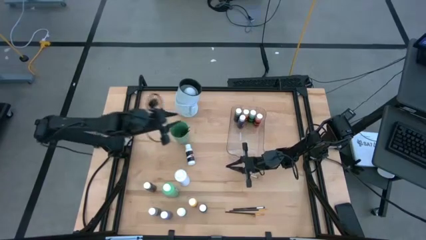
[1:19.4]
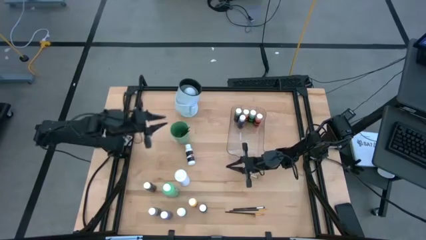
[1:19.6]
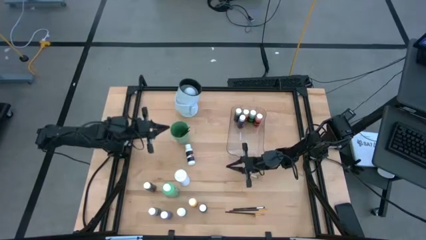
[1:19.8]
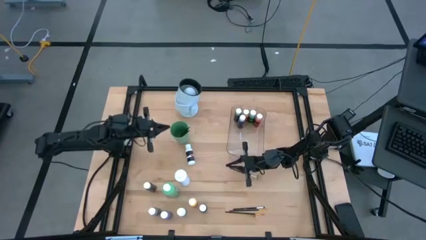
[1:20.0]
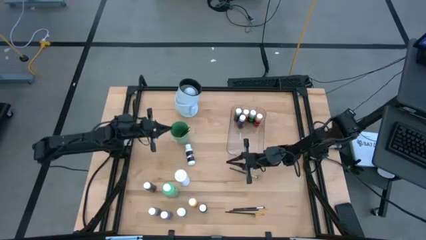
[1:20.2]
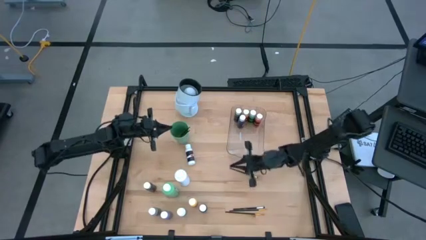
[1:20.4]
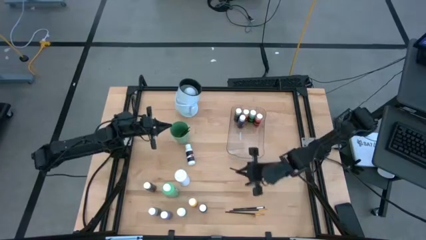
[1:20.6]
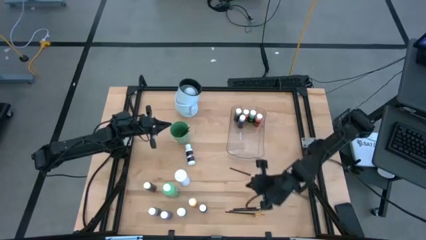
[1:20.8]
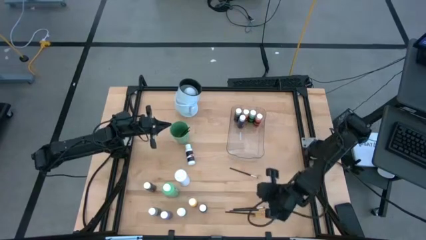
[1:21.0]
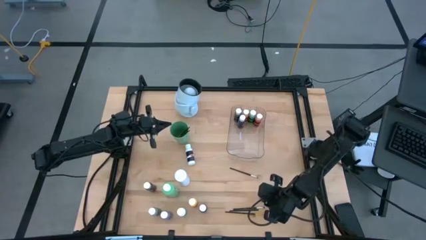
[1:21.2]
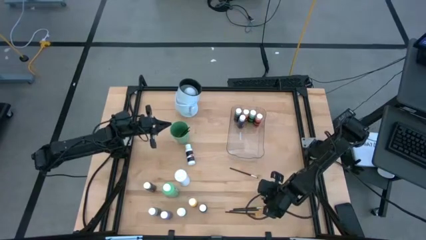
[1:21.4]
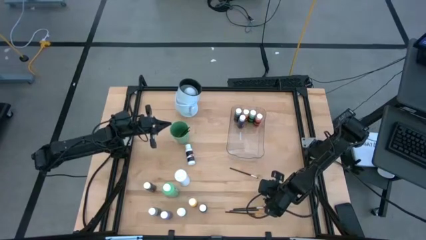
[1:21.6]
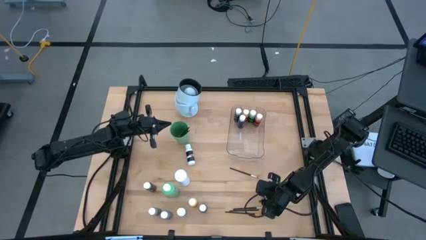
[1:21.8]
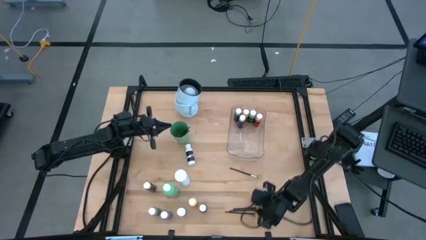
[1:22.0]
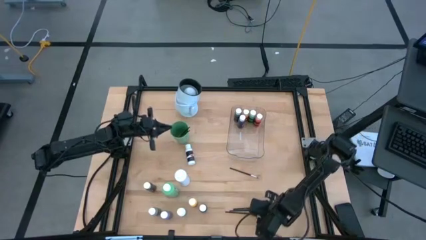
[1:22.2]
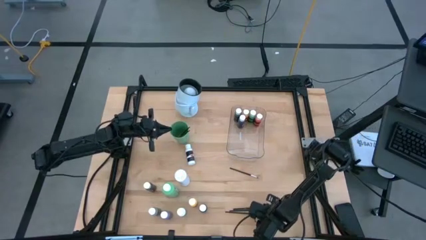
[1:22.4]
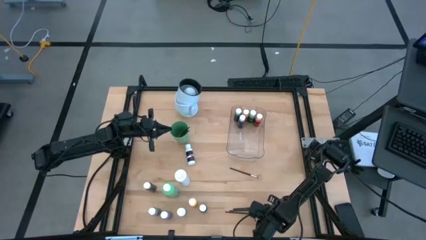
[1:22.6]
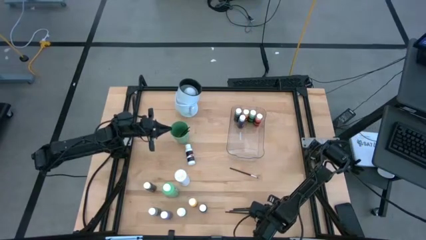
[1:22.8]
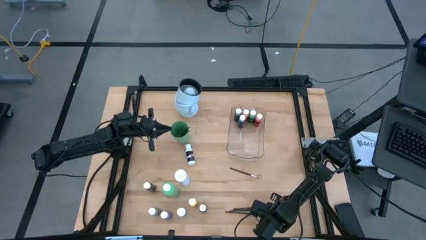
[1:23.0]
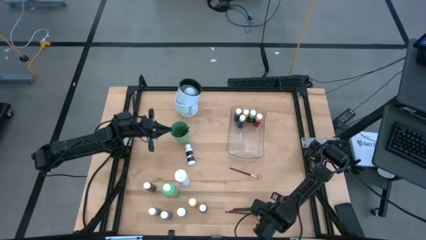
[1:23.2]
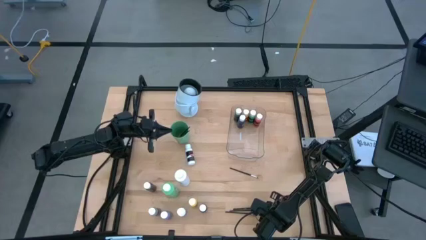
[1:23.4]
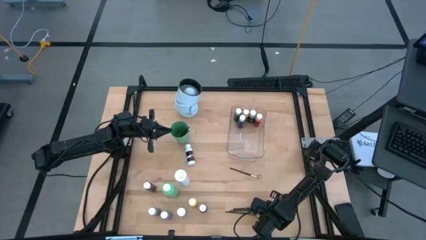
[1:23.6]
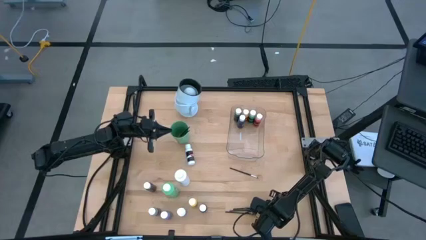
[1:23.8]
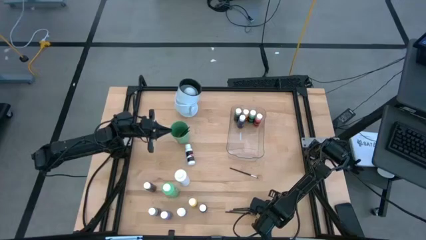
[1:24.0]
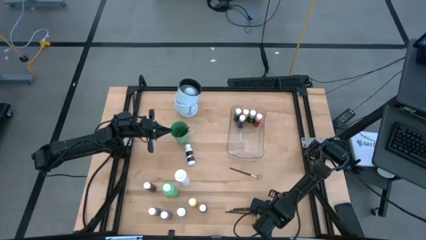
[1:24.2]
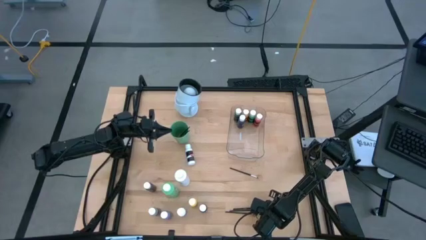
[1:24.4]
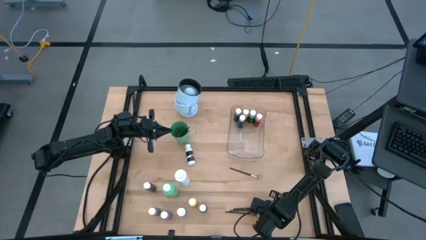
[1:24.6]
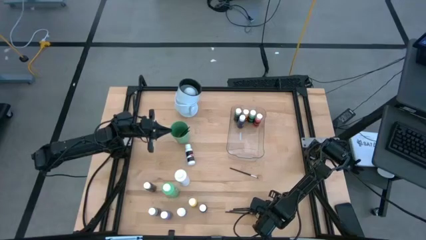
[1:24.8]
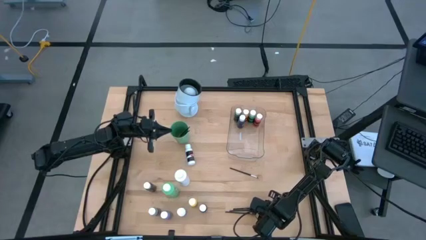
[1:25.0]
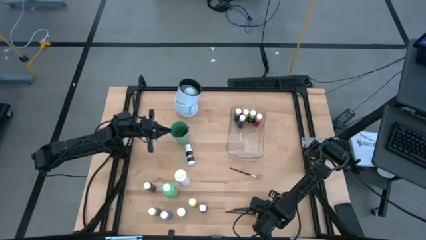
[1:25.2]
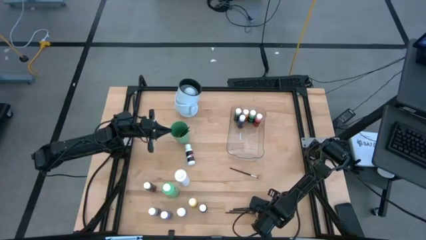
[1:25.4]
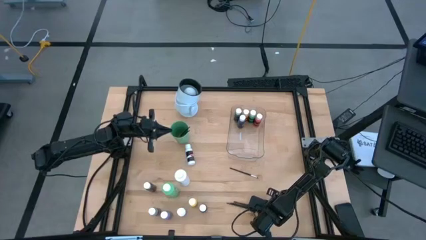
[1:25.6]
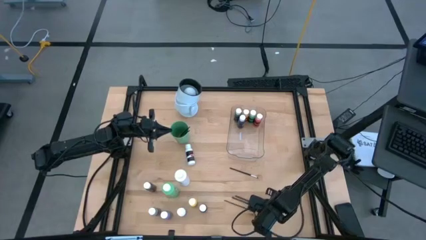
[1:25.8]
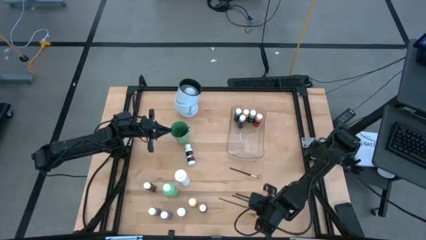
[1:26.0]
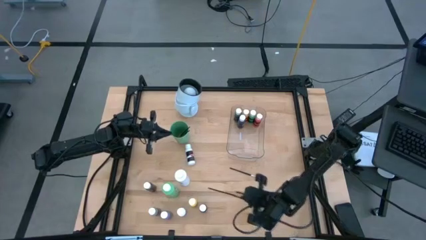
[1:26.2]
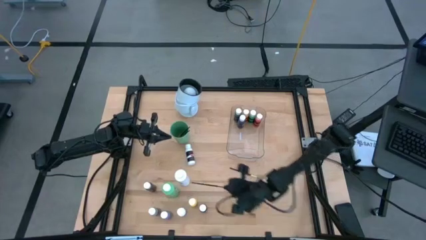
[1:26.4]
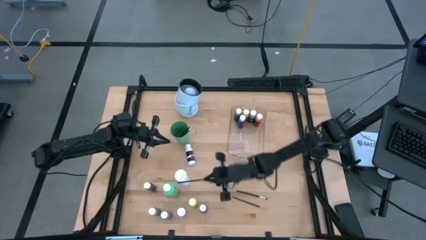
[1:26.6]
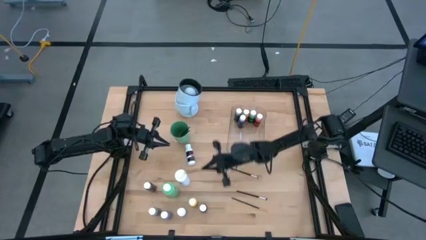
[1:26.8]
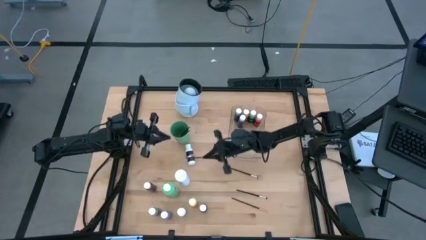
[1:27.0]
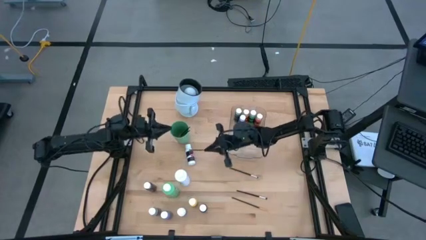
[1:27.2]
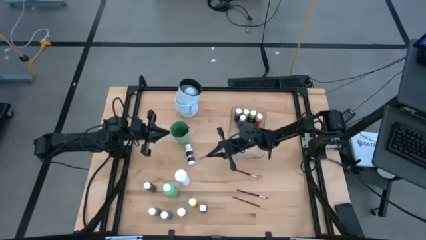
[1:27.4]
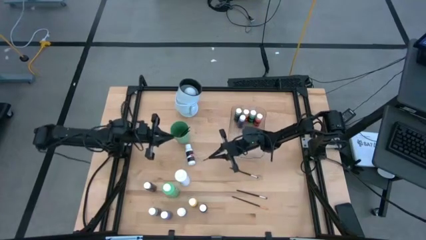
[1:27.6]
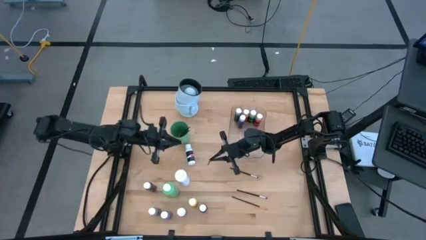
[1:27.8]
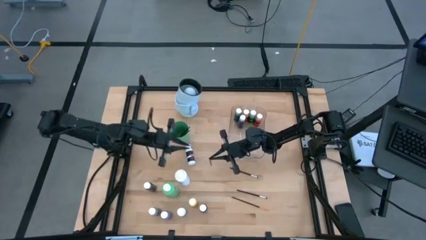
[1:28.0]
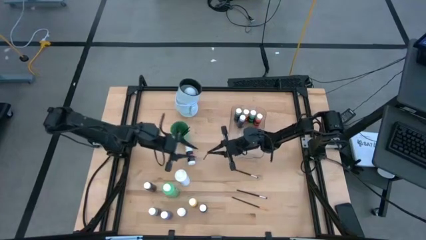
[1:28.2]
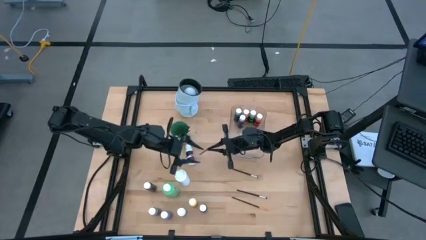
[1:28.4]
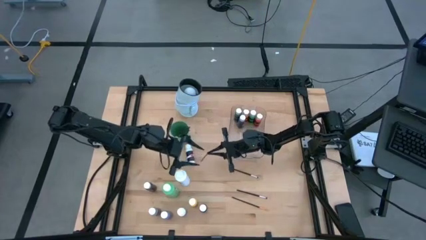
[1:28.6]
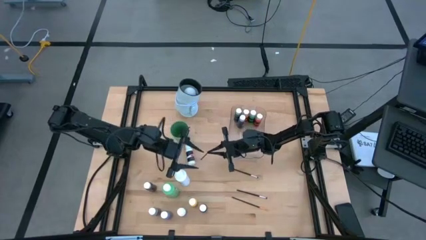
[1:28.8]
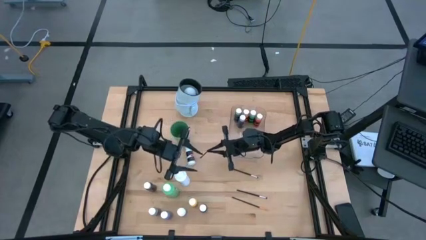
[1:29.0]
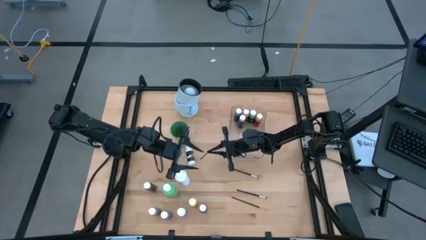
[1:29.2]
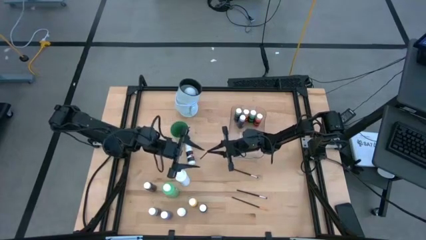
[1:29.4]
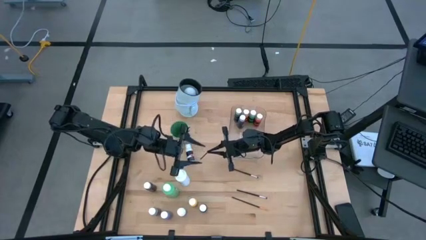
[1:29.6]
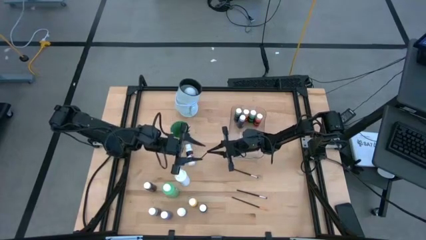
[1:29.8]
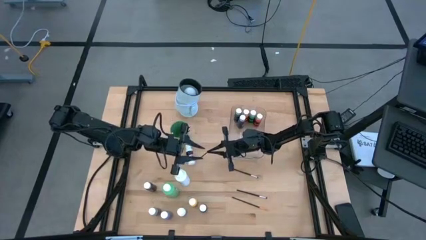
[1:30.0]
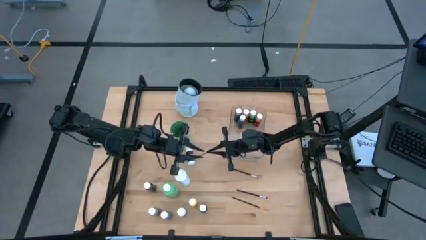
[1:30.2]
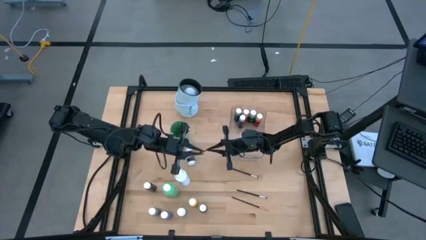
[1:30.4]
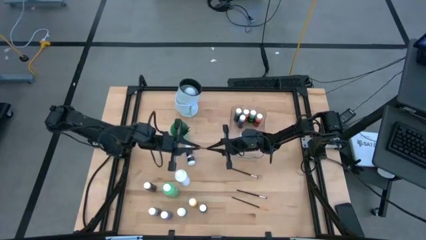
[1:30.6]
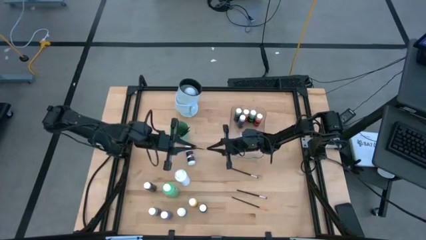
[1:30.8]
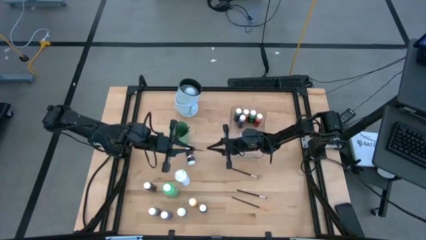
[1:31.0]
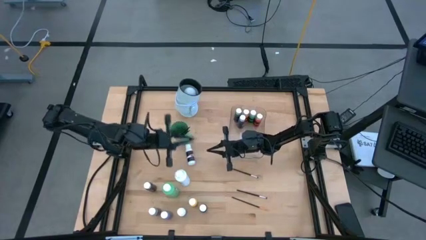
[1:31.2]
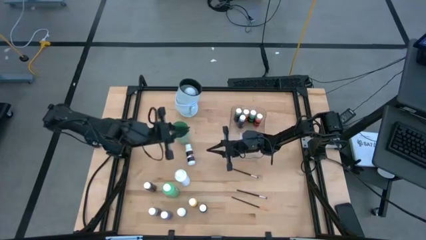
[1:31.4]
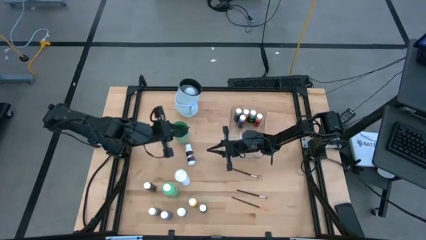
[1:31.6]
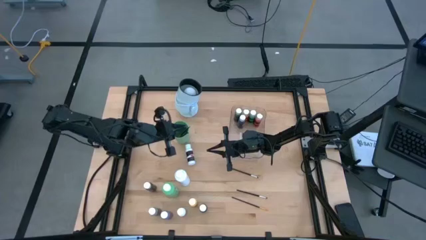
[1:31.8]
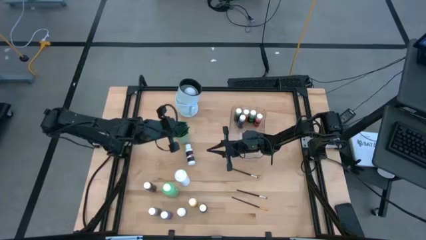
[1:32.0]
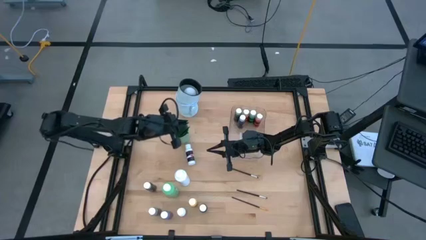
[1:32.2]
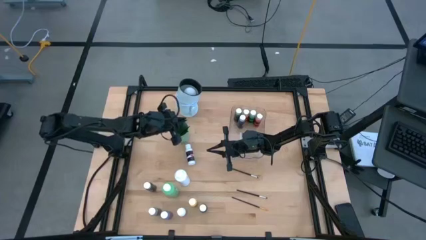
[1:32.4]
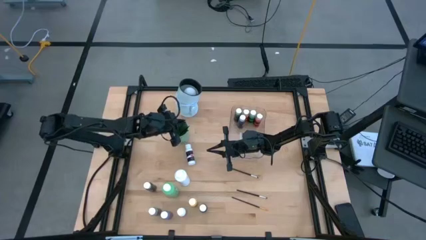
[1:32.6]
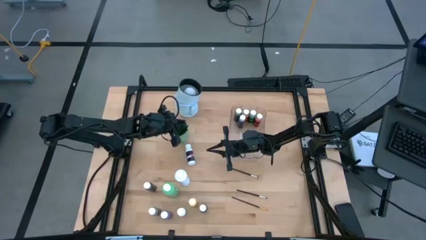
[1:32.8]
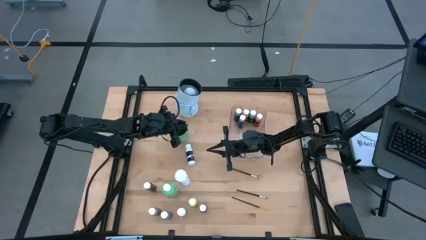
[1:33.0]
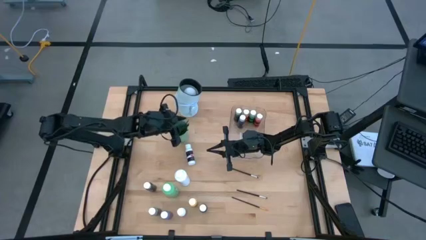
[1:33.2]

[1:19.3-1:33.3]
Task: Pick & Place Paint Supplies
Put the paint brush into the cup
